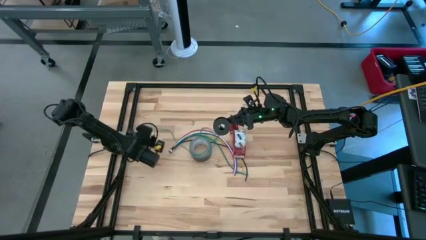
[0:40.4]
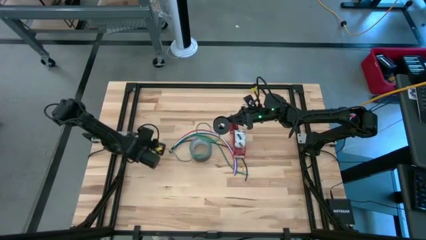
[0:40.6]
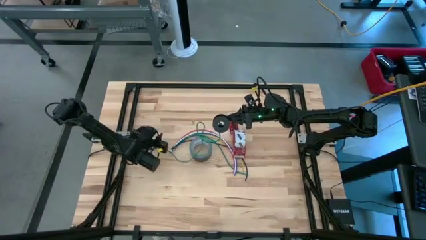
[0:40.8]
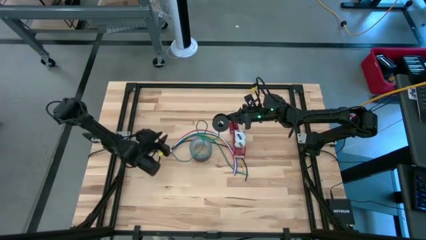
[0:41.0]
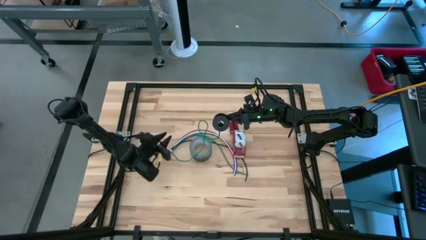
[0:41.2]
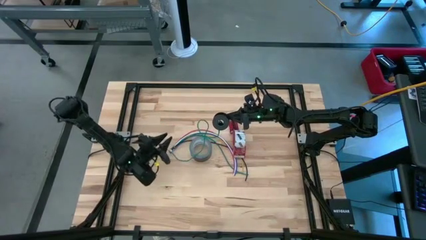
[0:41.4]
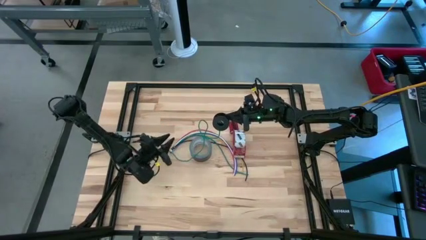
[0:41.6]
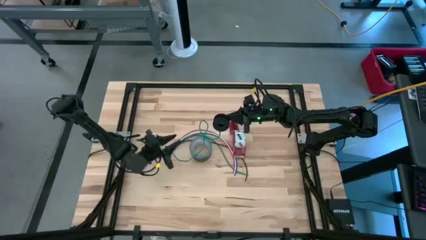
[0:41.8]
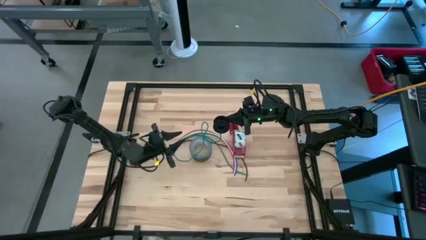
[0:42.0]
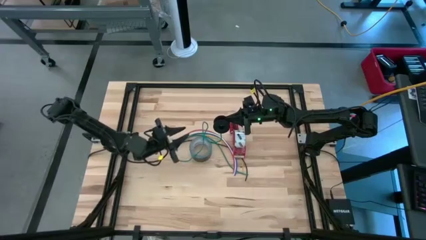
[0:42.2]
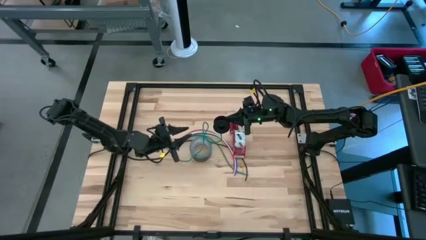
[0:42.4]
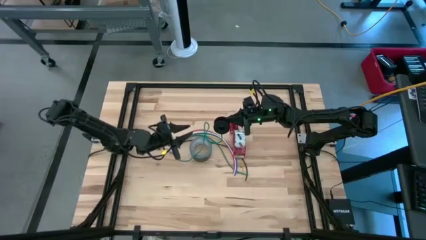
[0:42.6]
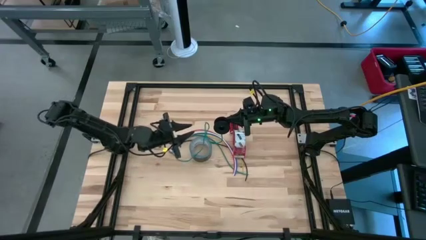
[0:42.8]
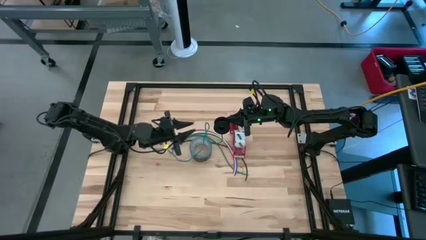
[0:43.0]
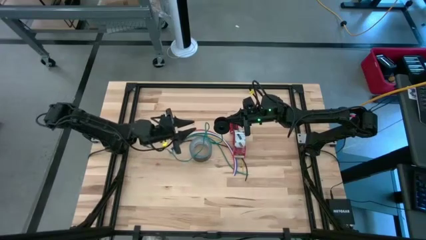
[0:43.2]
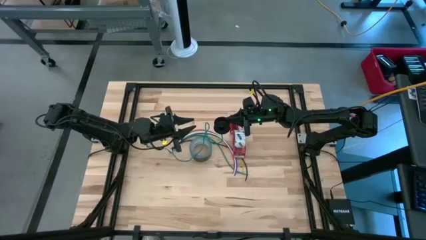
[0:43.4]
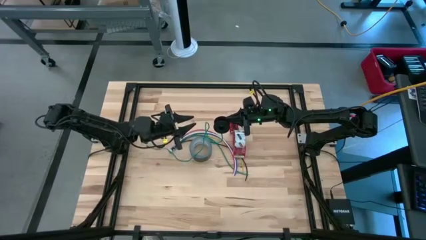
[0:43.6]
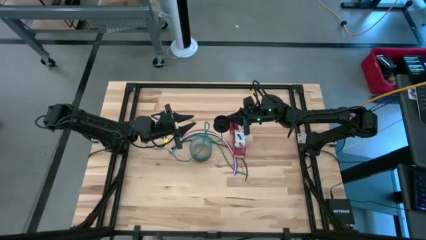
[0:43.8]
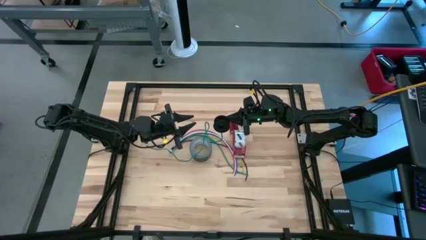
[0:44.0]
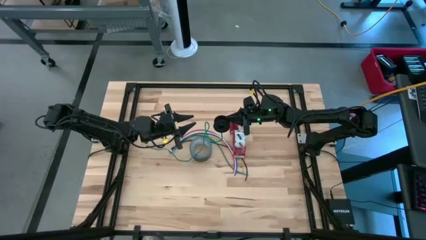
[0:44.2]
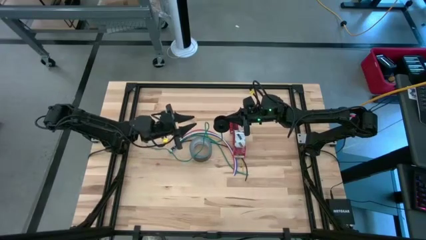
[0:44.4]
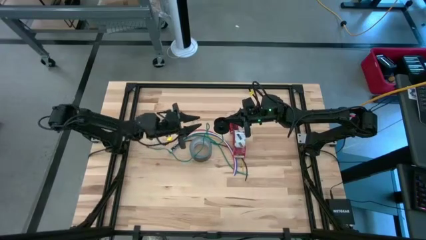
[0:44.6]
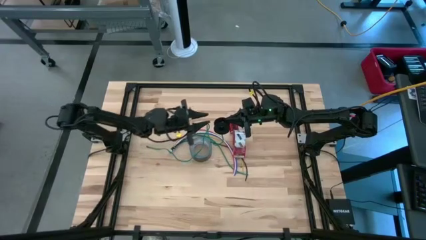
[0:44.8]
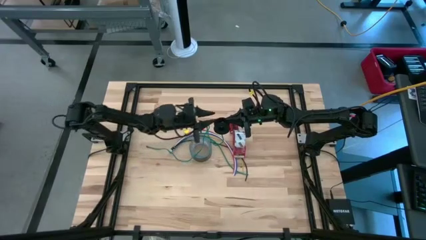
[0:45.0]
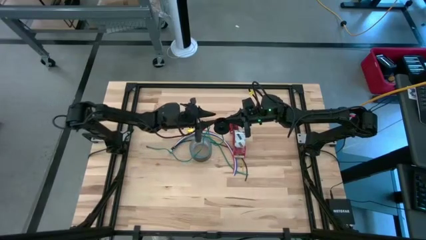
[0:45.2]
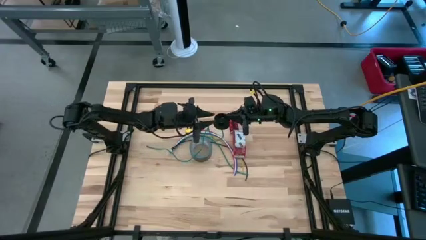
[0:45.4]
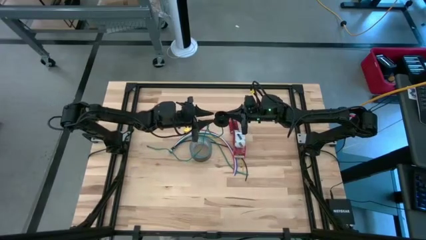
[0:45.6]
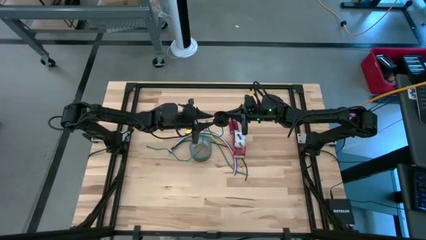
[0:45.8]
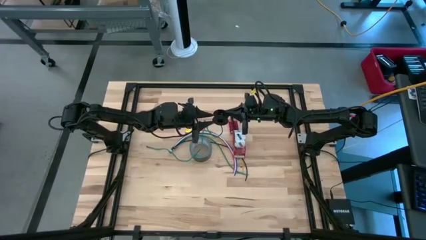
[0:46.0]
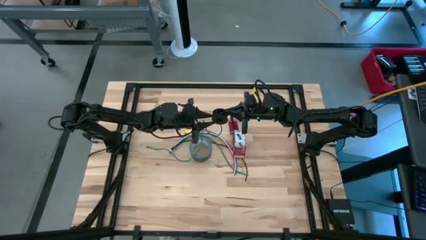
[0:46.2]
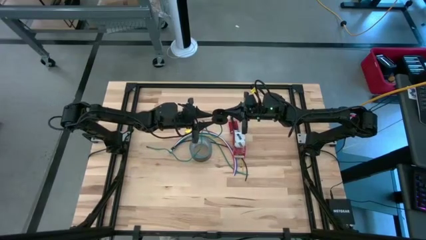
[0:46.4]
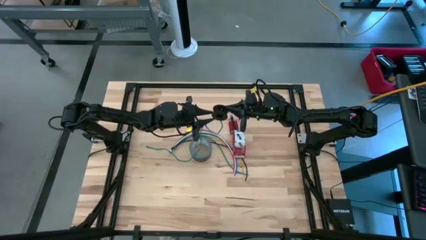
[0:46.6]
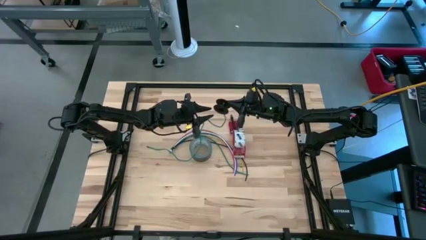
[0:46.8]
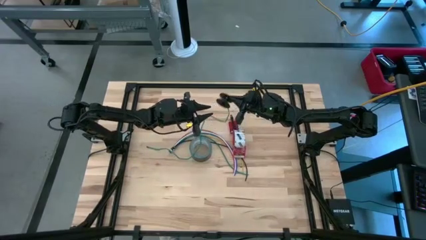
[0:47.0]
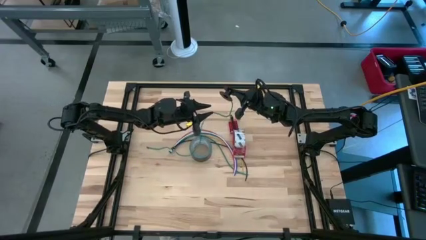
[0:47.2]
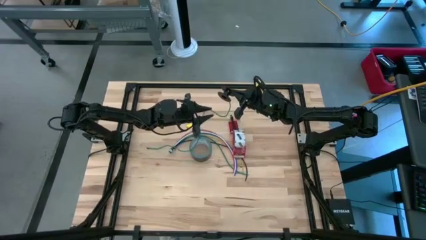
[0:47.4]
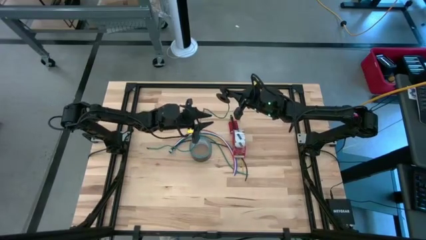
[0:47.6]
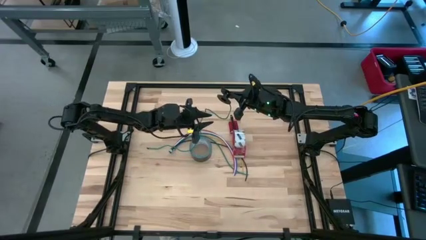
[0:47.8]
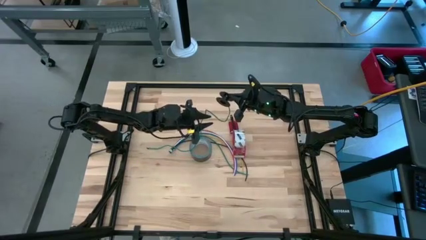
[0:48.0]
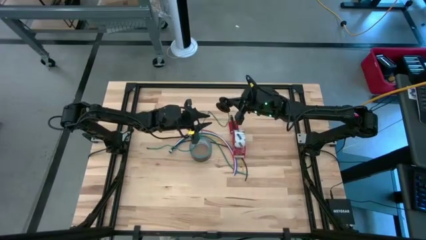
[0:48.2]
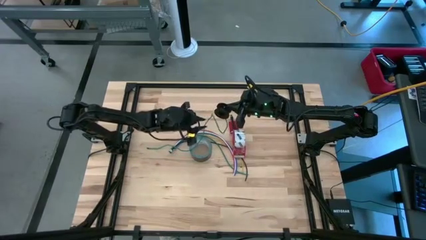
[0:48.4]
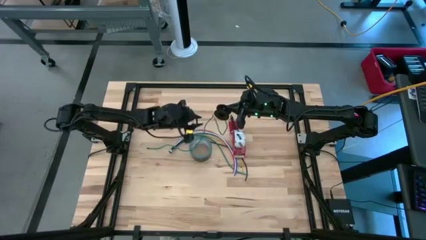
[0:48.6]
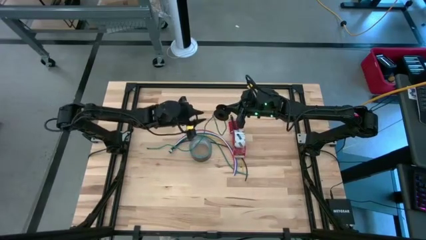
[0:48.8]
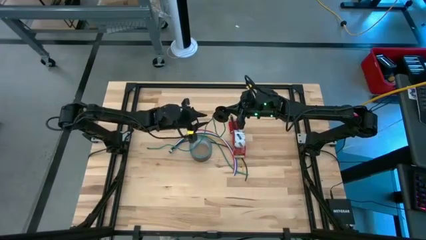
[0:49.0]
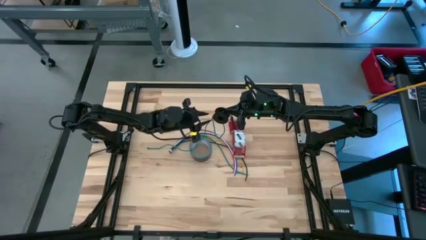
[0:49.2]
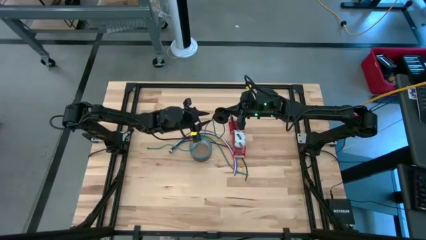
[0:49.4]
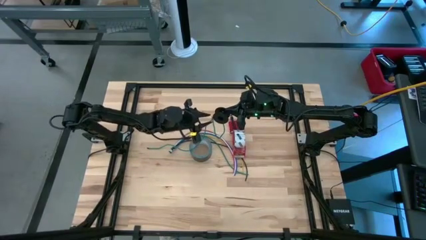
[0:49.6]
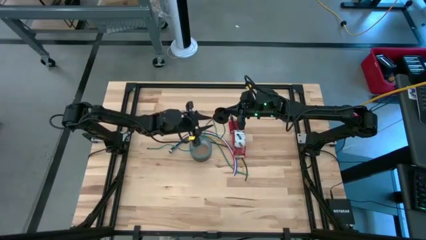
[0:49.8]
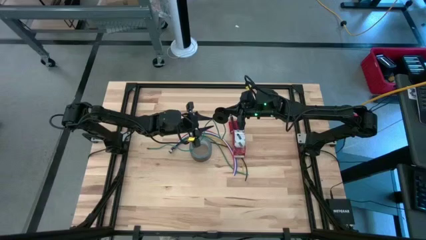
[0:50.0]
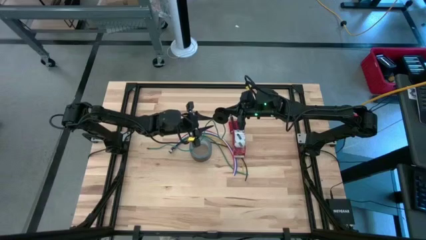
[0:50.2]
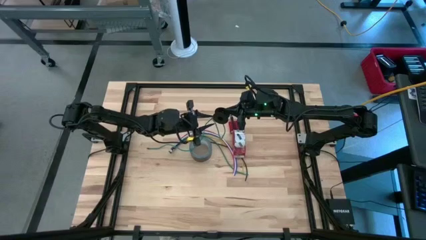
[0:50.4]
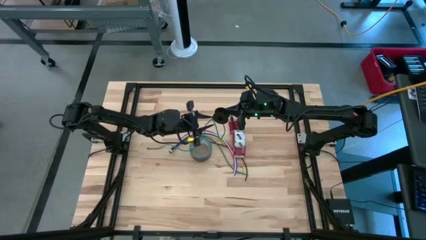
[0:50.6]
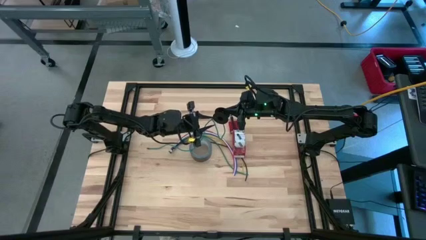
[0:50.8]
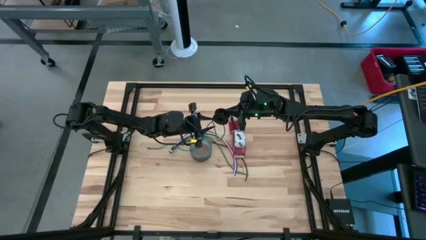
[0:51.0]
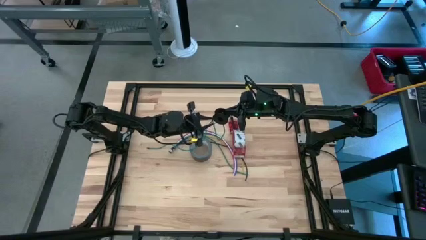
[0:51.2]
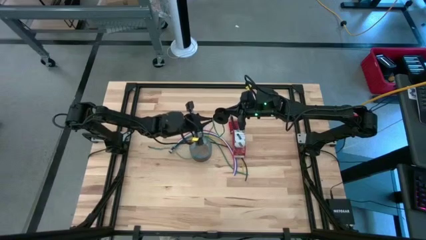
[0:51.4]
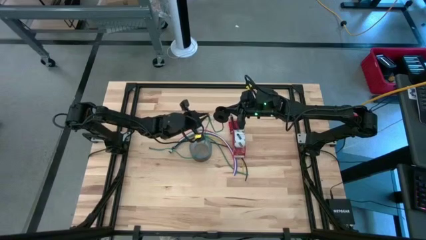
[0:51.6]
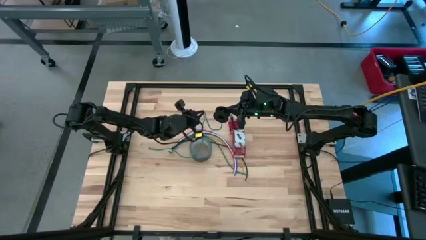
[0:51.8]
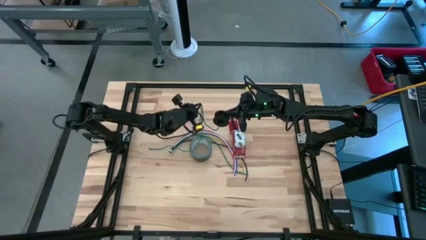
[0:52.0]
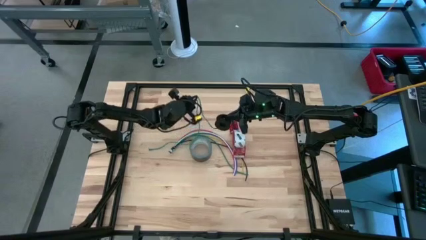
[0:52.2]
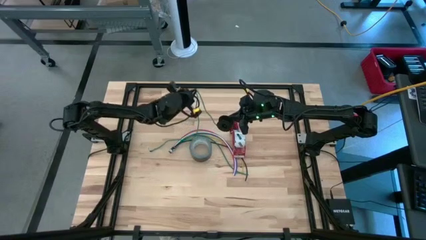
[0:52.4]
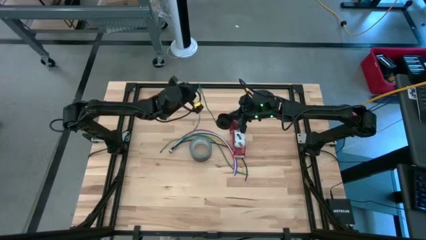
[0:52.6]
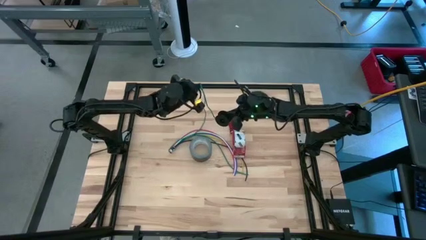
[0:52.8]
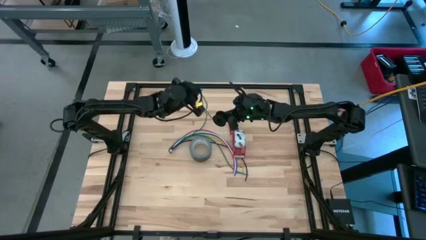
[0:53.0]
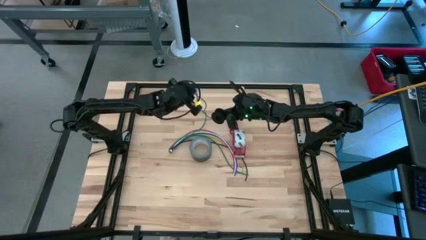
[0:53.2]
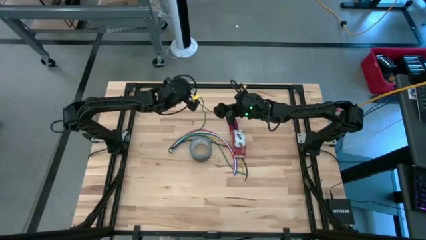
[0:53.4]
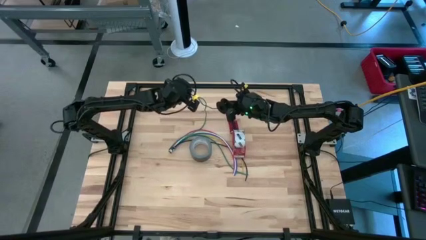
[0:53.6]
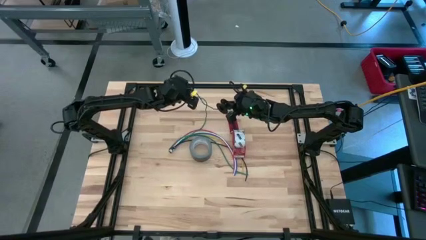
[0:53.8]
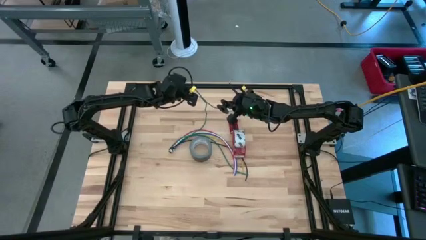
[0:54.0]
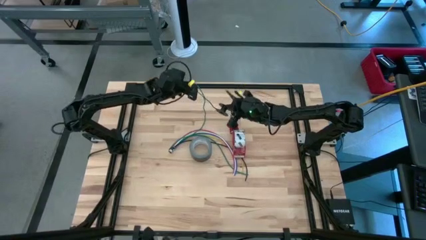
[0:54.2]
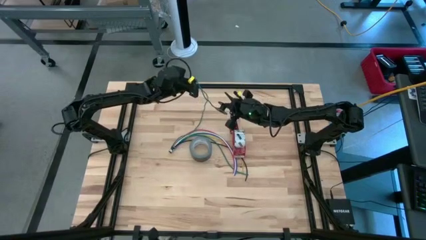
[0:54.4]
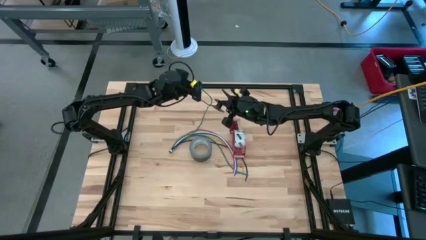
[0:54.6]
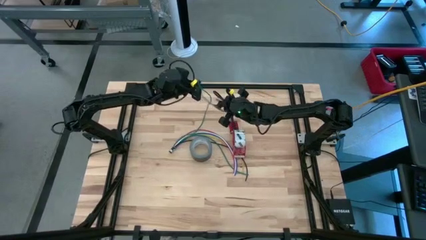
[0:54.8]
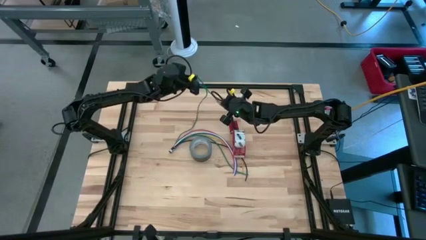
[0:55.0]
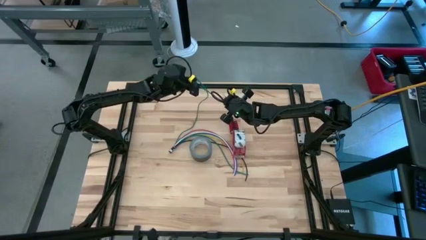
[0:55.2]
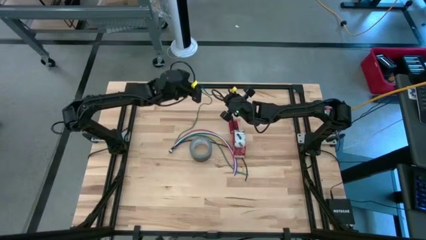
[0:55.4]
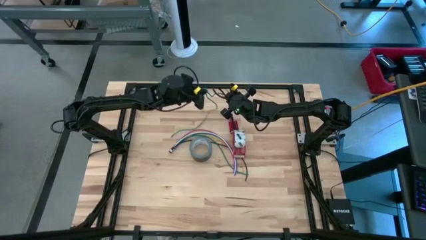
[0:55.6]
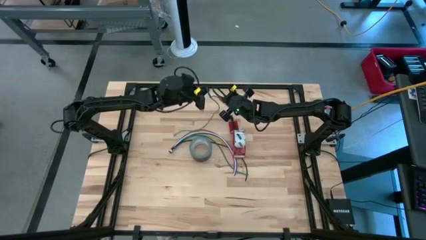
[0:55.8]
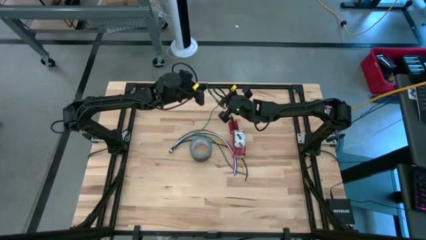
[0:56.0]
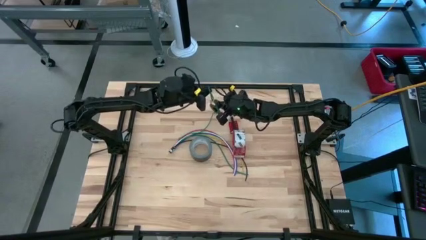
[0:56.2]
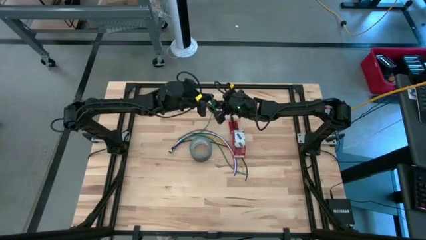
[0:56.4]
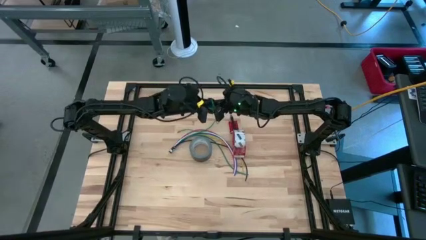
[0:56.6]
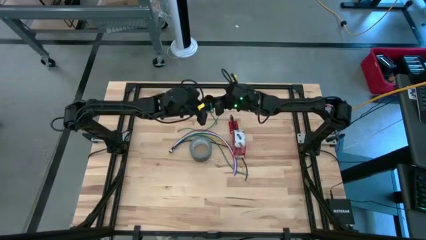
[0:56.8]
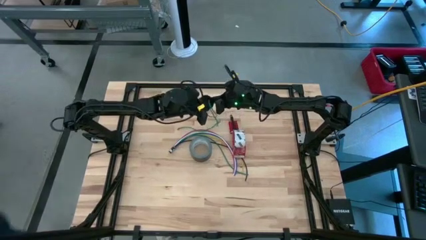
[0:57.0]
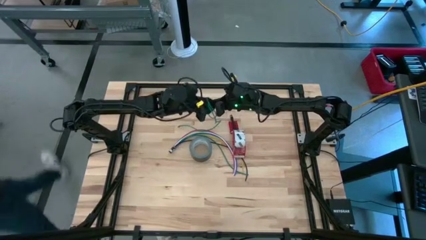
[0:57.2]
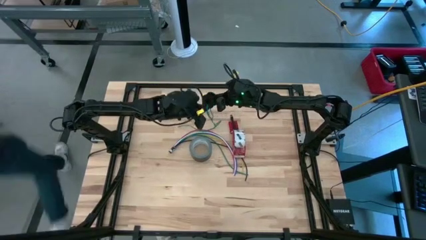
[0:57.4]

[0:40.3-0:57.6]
Task: Coil cords
Coil the green wire onto the black spool
